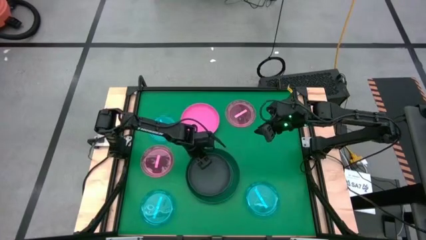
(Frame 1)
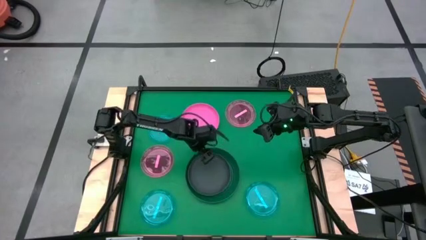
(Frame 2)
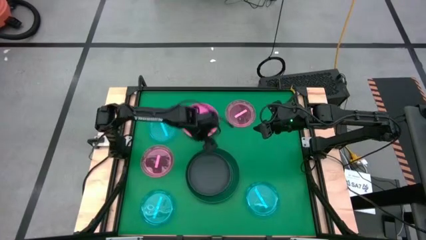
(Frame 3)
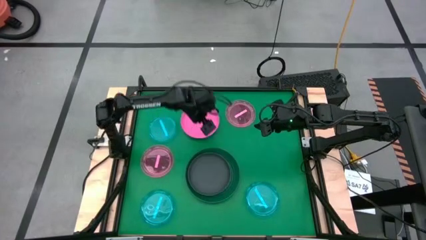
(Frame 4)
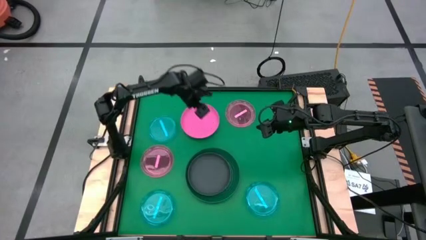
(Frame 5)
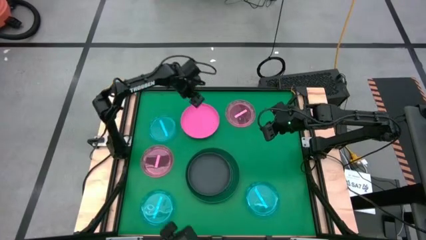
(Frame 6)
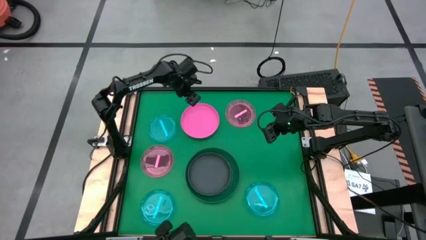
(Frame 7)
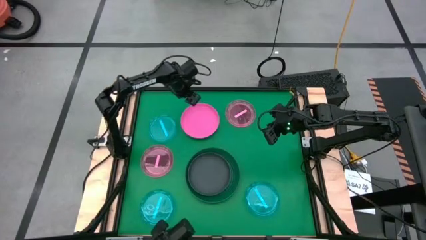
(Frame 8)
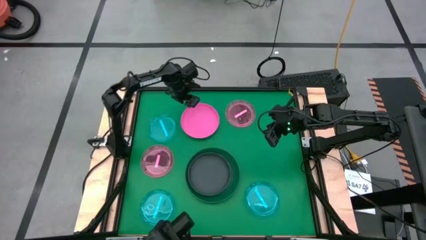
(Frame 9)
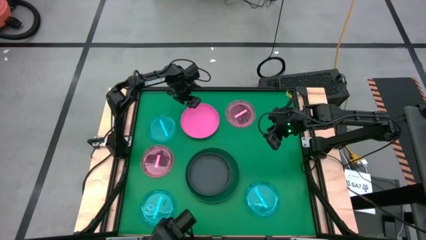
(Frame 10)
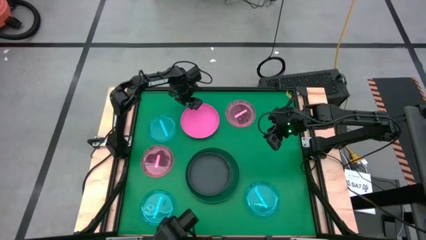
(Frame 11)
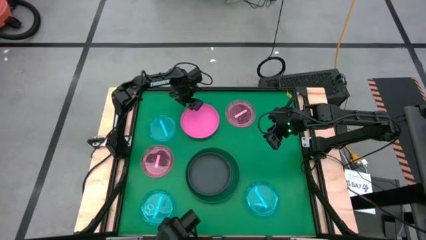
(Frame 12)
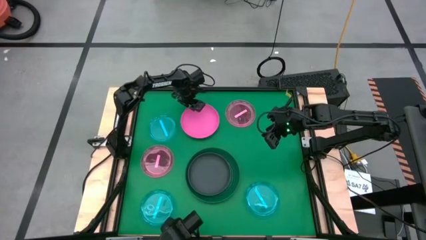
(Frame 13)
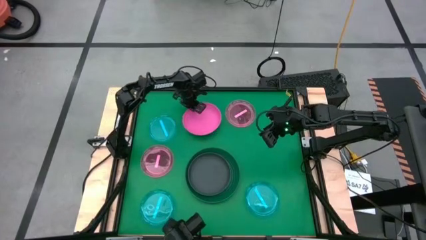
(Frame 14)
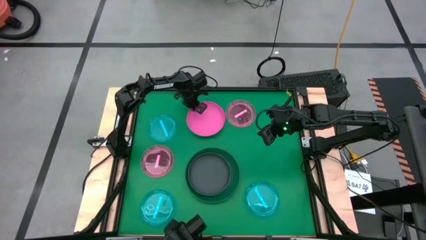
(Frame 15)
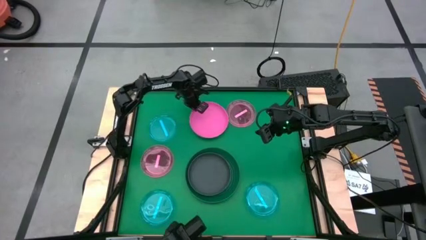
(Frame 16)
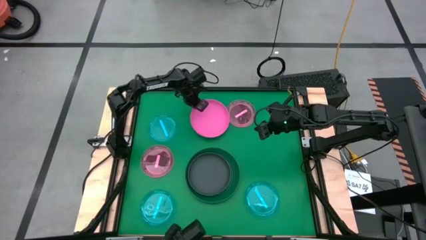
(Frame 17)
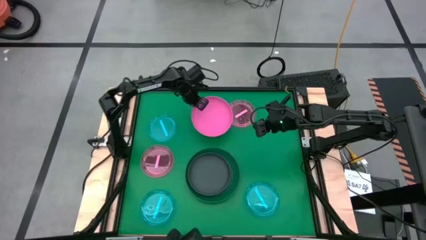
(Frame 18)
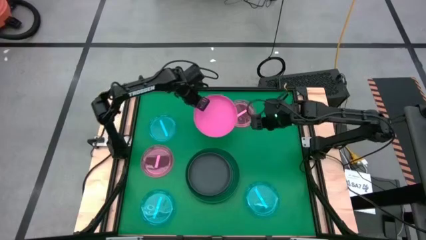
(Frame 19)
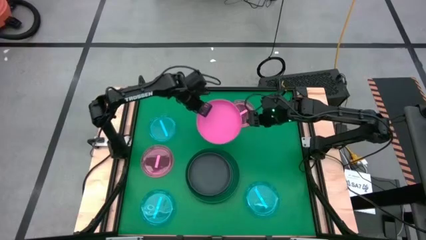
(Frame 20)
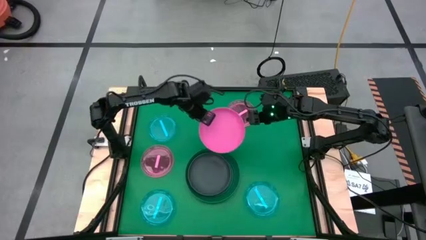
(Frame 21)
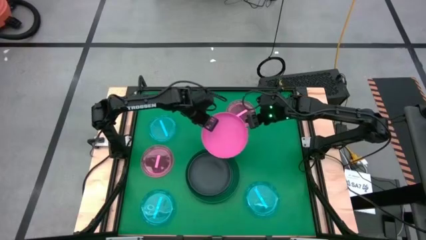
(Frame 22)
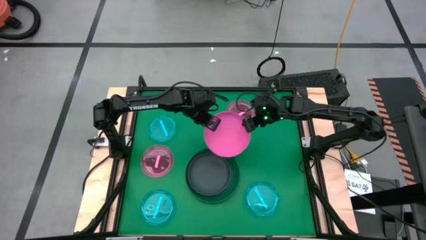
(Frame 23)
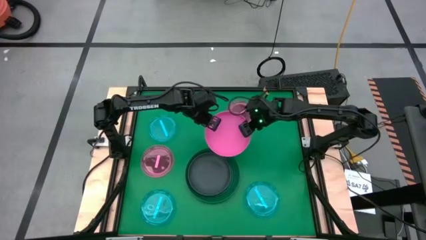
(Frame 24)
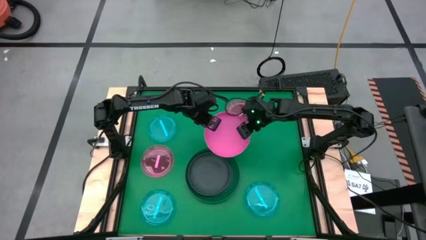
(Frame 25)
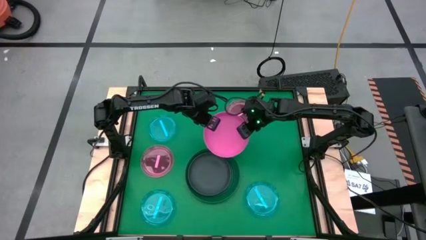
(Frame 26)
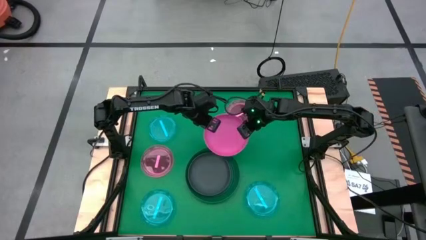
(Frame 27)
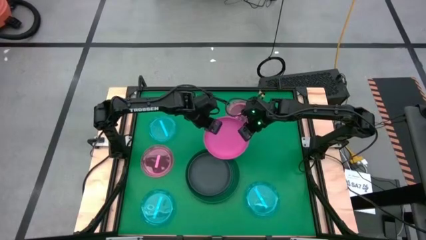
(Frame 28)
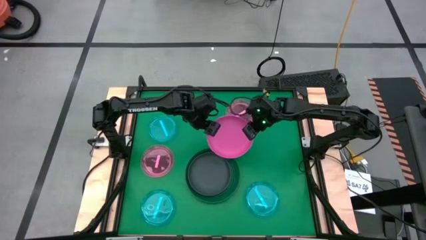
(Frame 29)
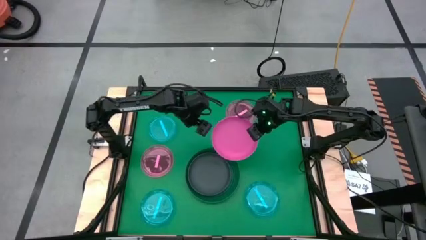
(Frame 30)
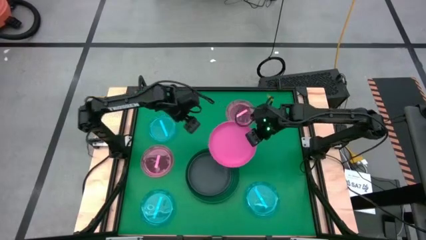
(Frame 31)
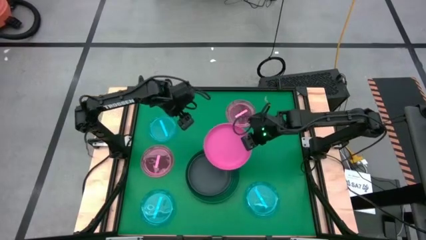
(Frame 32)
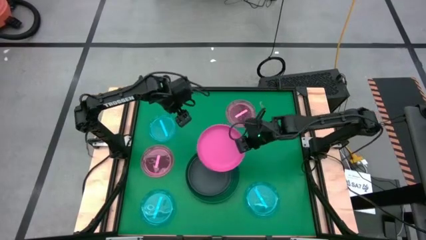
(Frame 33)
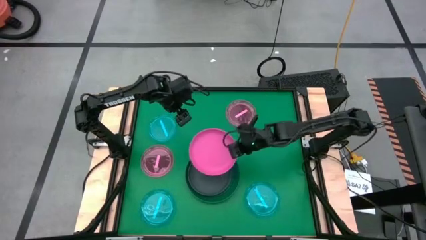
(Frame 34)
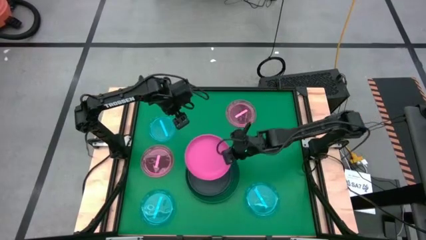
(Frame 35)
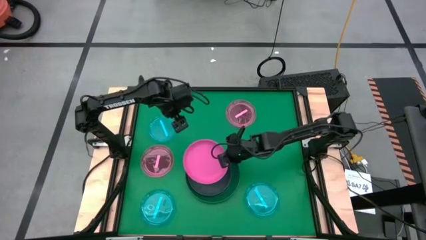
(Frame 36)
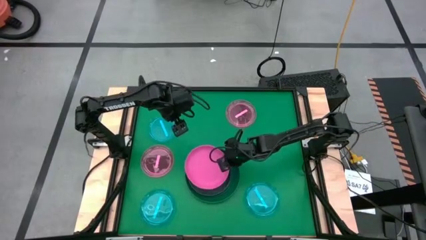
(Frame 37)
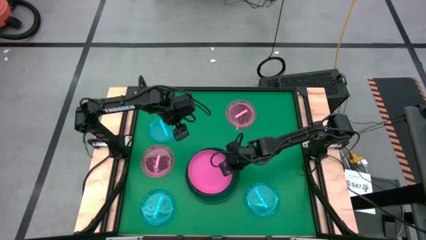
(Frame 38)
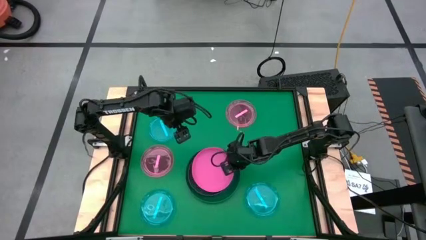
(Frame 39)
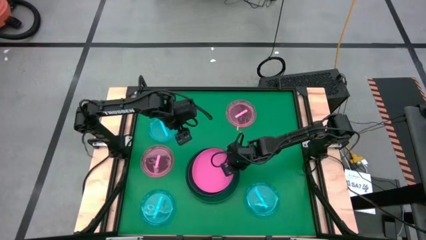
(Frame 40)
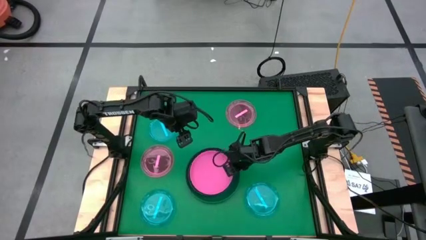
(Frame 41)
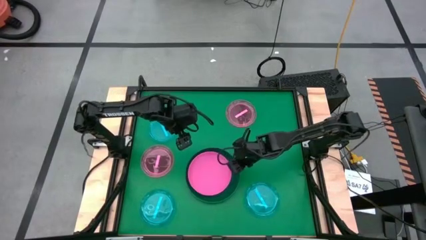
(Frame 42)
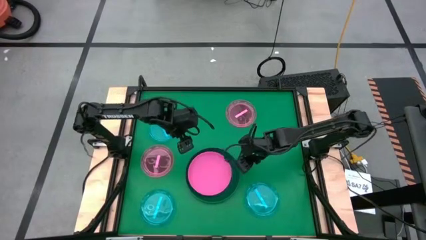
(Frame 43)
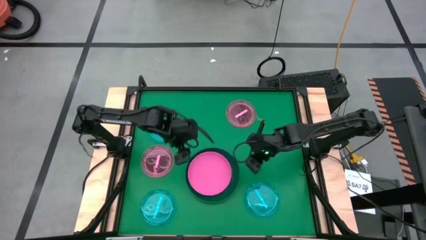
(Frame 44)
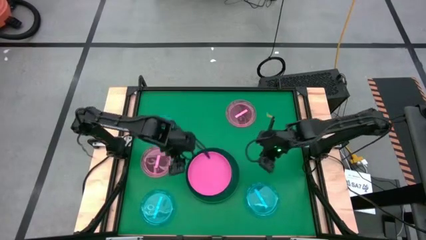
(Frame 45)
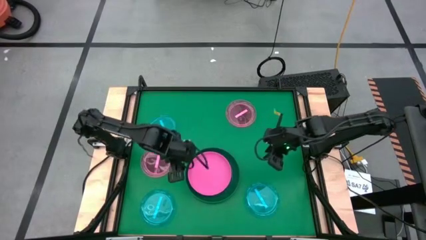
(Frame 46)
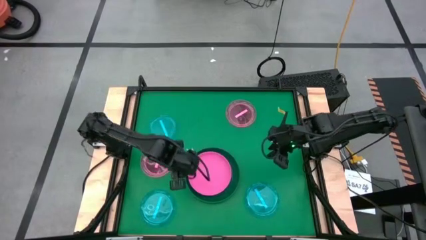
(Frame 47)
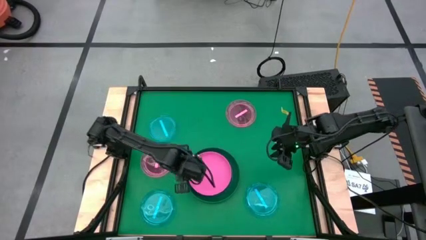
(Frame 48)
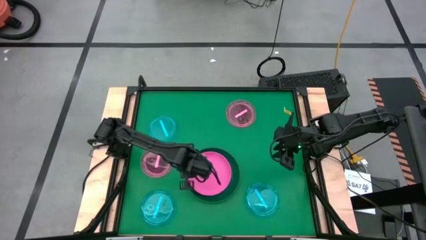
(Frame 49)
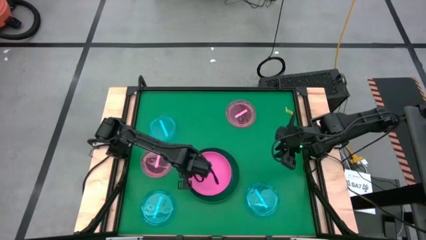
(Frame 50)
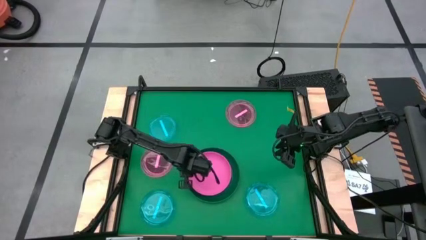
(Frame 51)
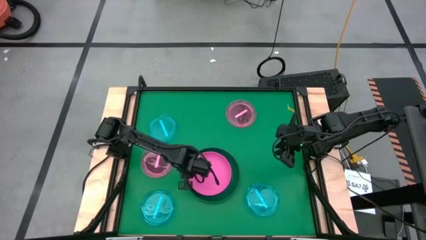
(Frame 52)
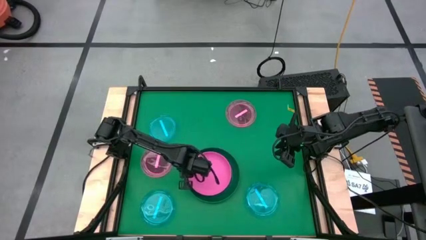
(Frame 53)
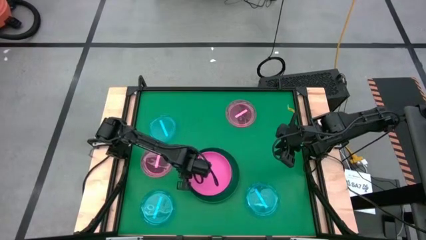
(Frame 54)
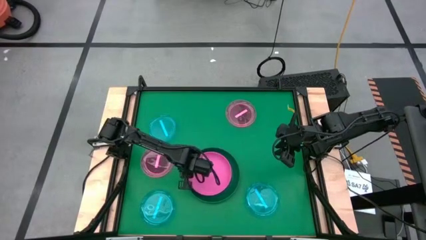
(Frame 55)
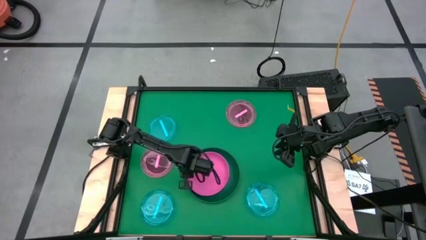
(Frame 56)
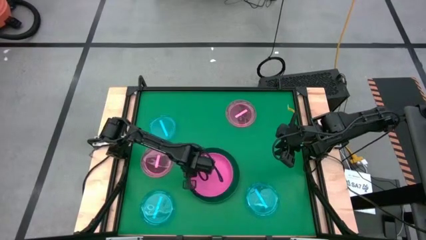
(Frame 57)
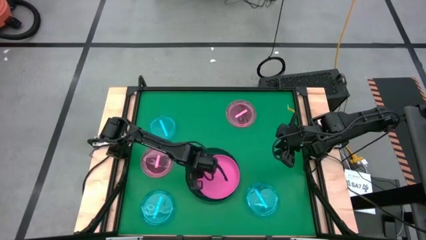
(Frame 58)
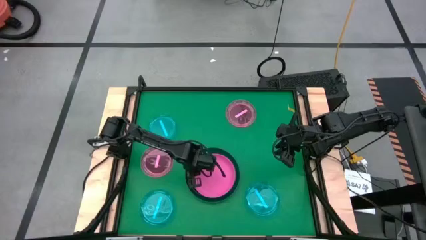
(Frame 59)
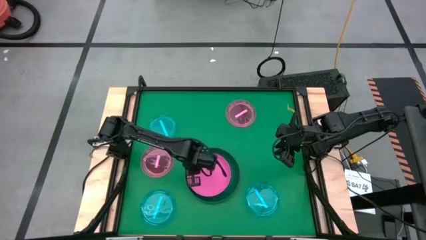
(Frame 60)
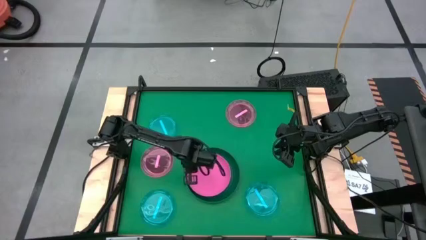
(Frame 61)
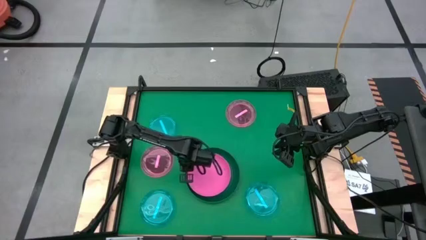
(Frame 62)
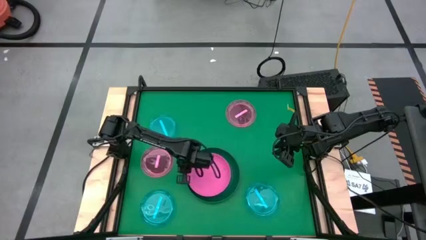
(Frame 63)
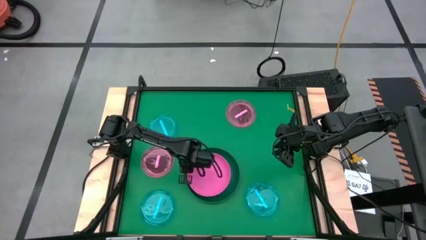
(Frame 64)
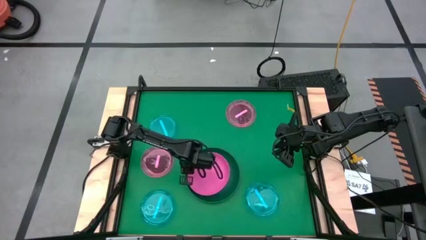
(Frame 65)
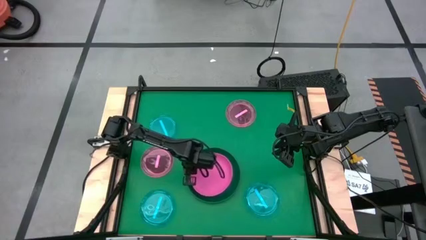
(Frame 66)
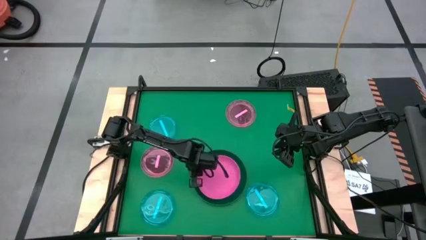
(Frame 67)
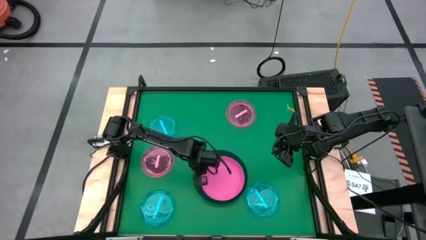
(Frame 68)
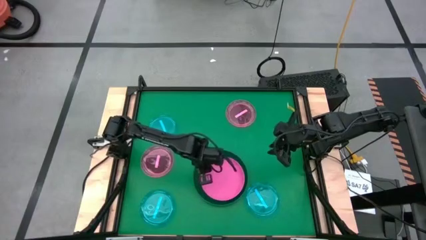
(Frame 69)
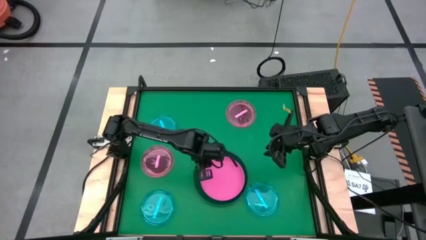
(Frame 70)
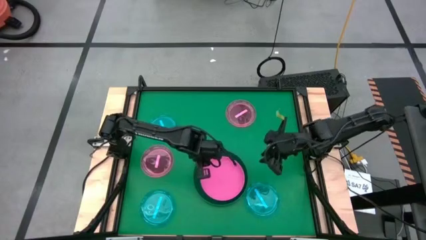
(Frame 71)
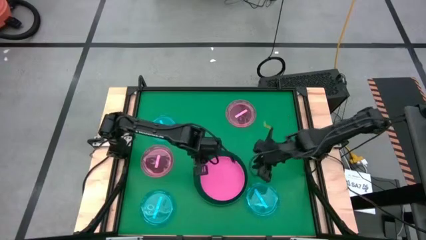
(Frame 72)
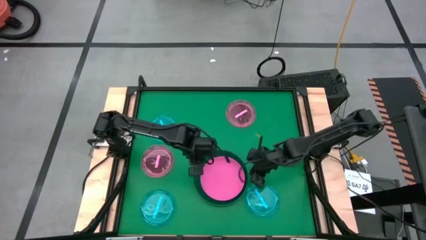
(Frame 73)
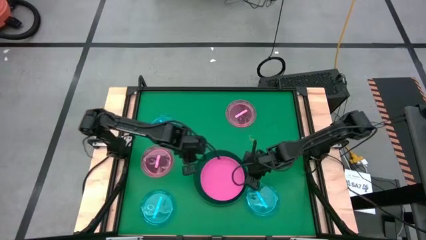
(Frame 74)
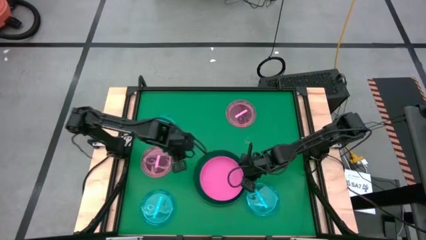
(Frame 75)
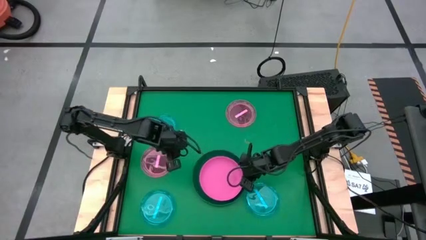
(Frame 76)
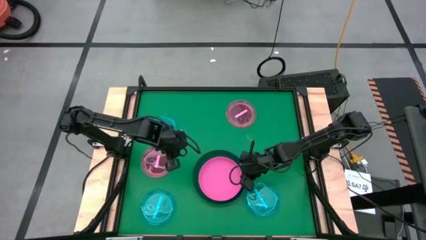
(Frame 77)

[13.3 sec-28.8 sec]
Task: Stack plastic plates
Stack the pink plate on top of the black plate
